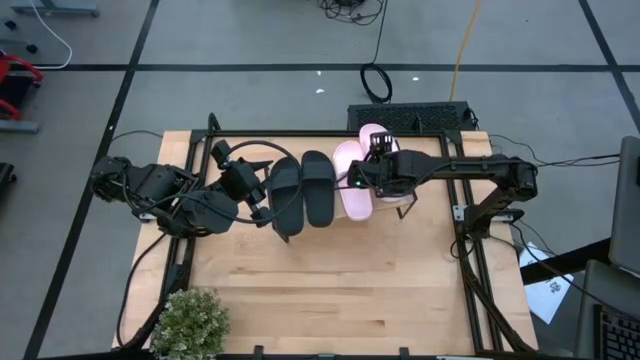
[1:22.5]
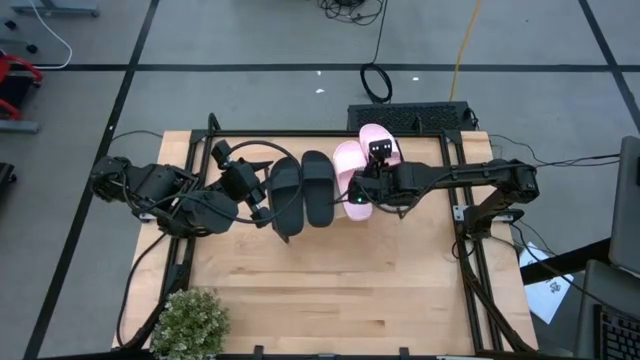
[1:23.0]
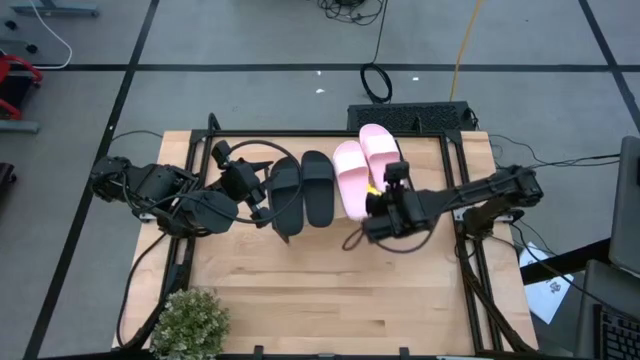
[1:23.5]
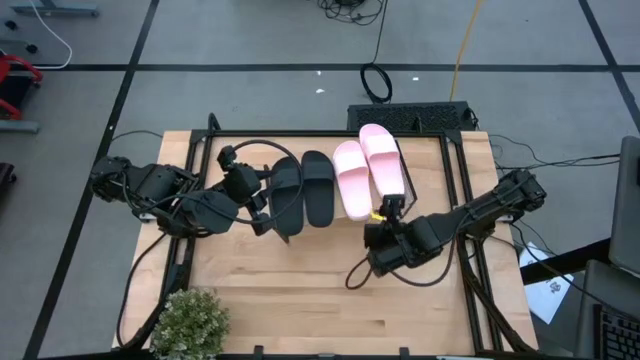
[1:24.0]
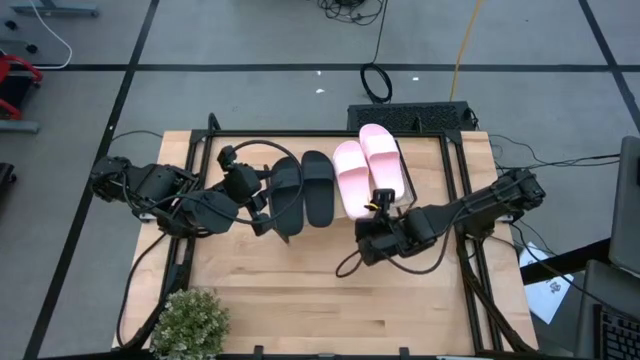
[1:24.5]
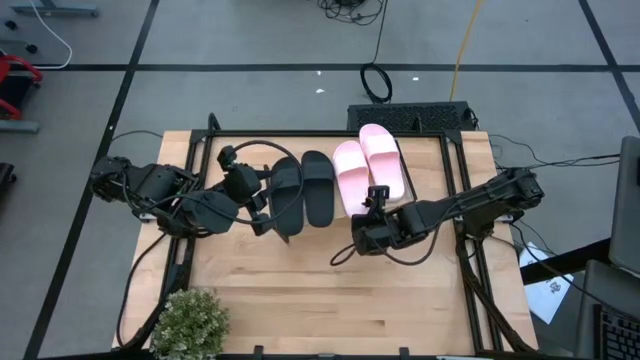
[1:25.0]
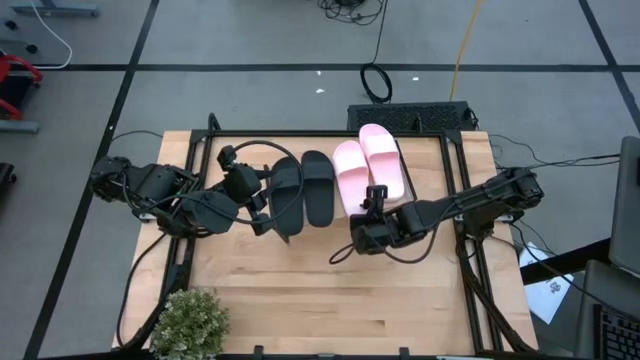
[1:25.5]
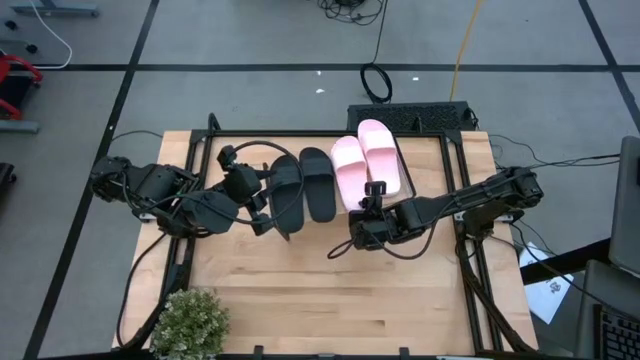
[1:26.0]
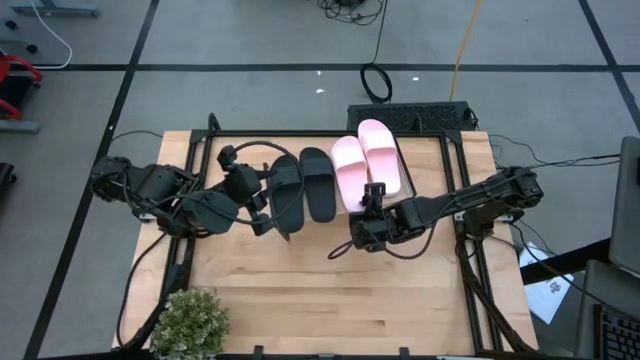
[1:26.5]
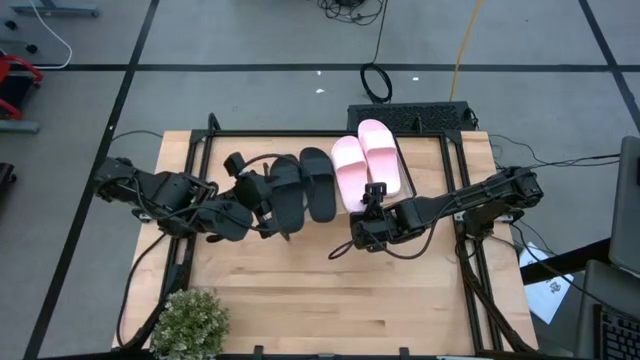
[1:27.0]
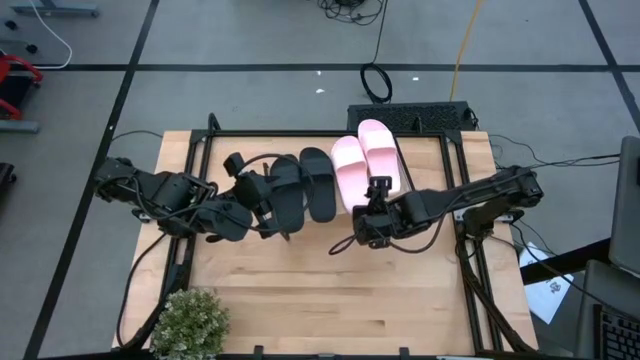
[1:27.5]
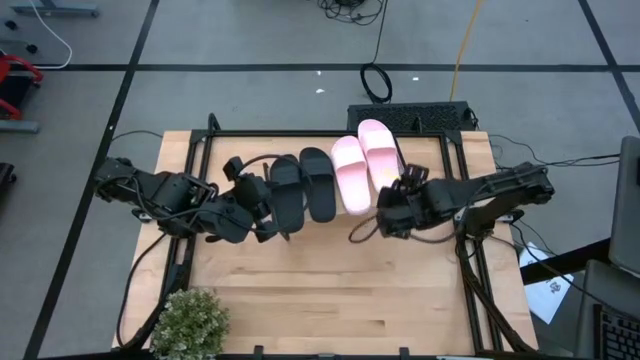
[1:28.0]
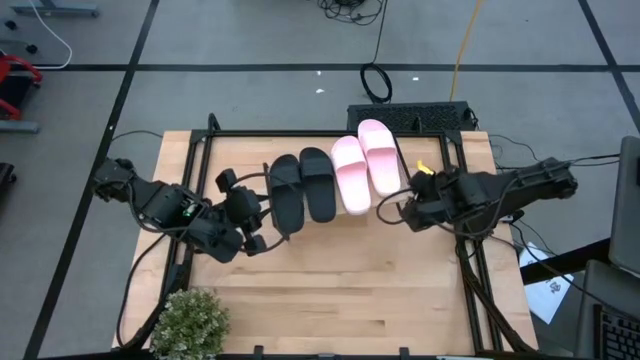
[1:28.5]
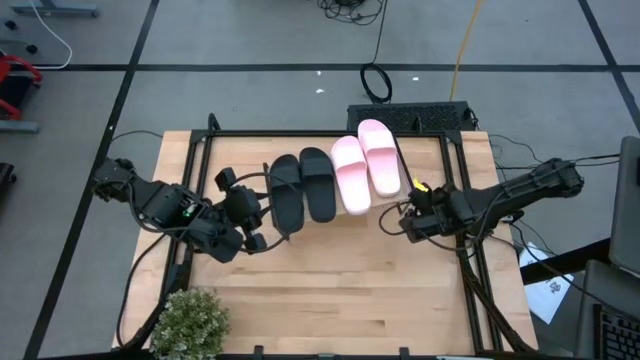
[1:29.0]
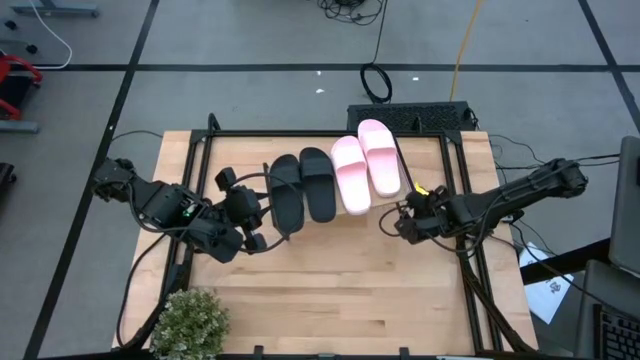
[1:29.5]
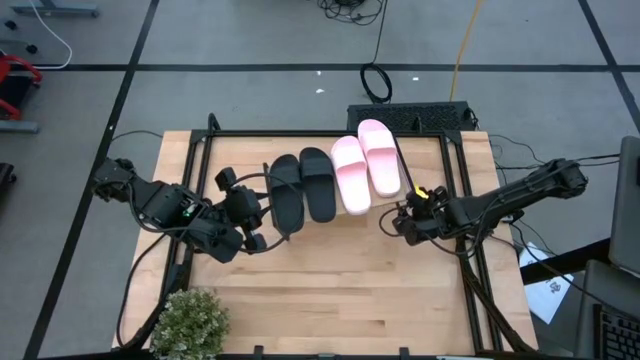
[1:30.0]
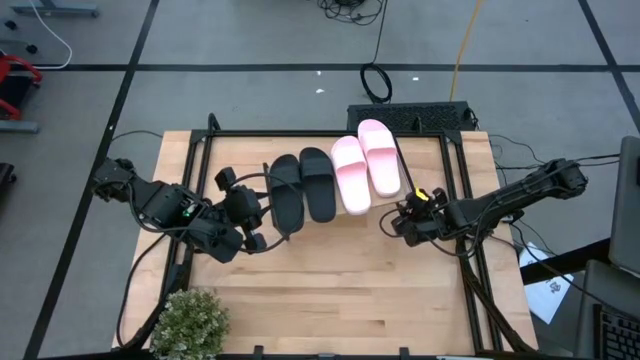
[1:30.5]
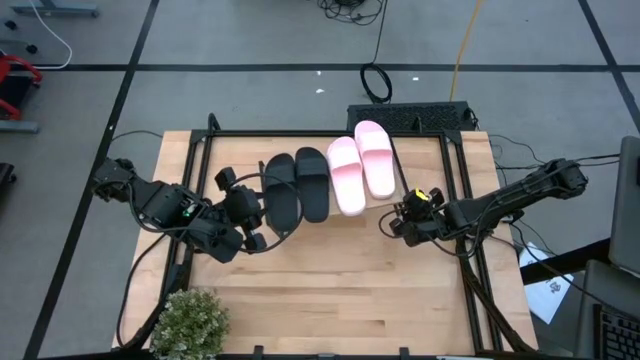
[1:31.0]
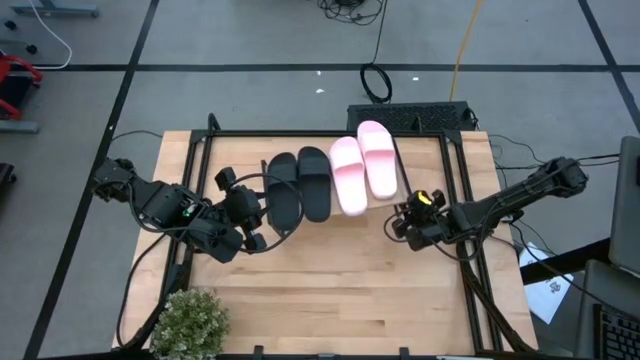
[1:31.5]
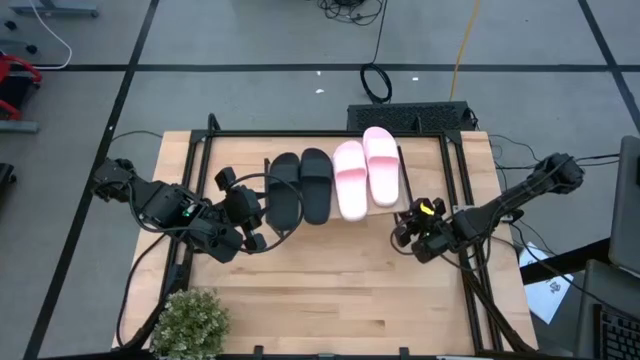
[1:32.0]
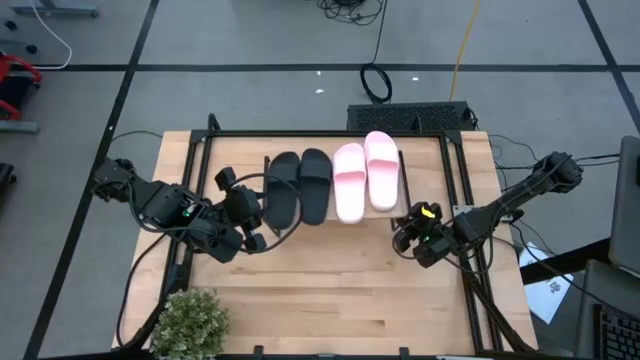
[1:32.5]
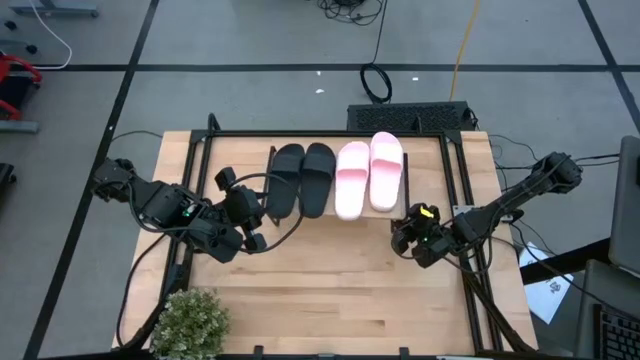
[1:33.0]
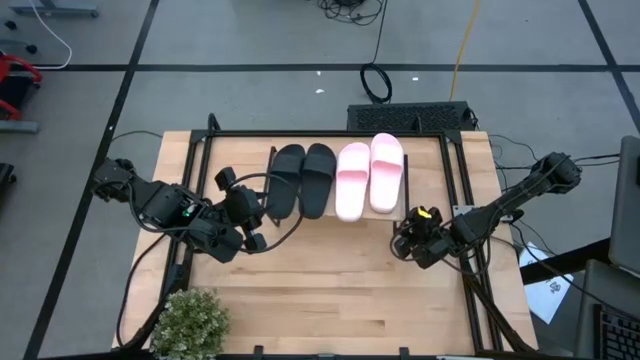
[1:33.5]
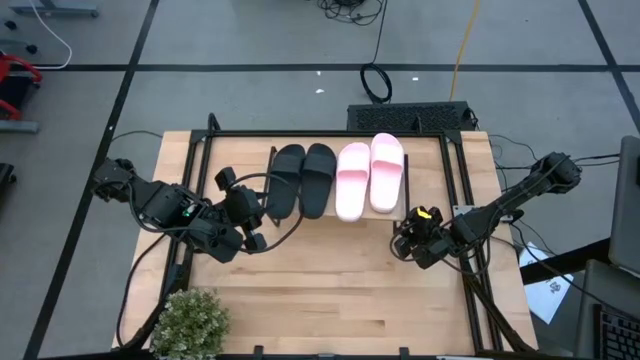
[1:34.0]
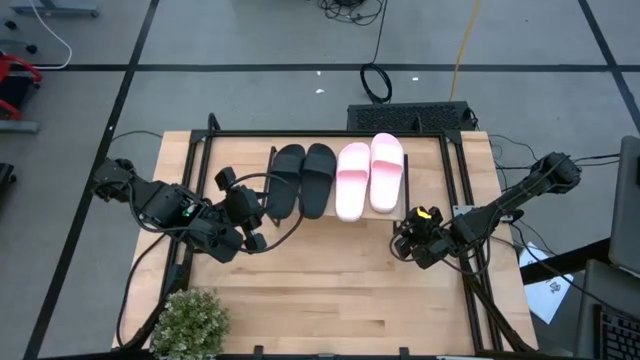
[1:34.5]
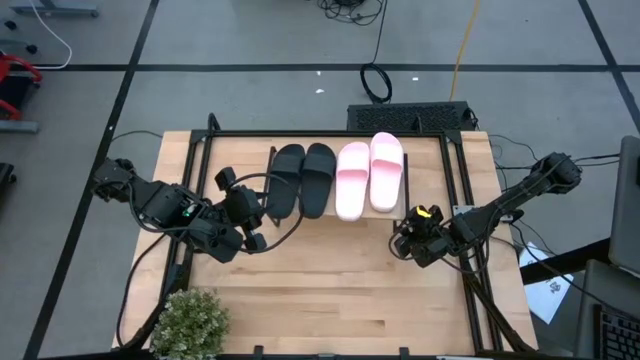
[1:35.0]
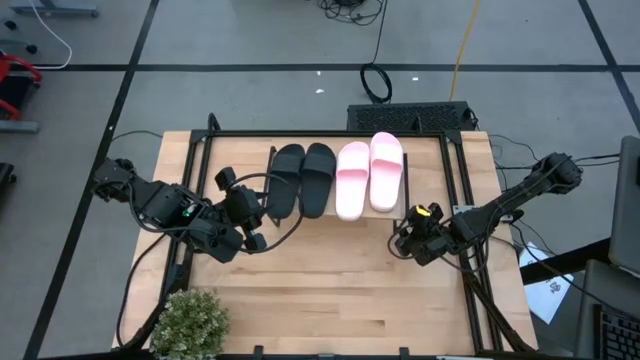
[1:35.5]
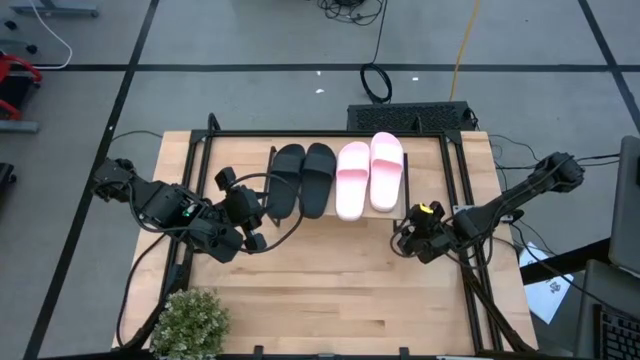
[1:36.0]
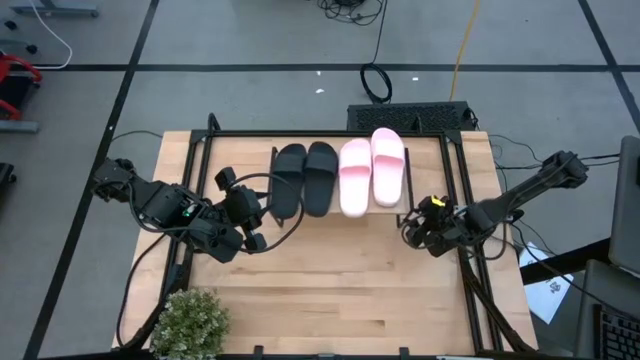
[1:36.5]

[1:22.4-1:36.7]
Task: Pick and place slides into the shelf
Adjust the shelf
